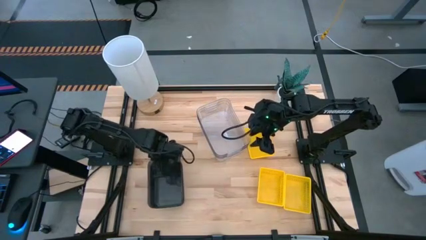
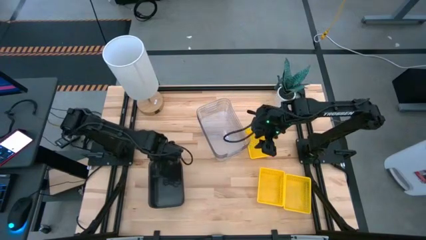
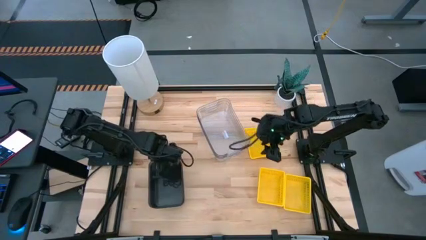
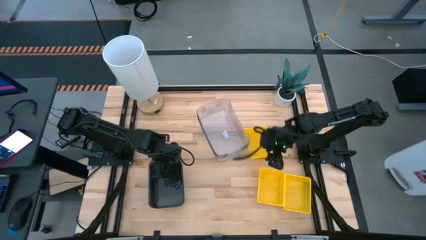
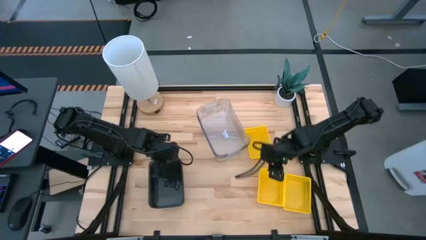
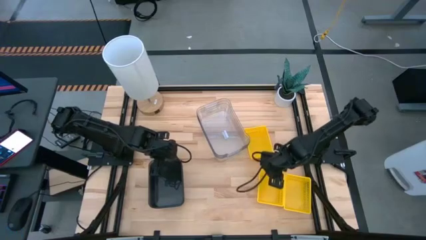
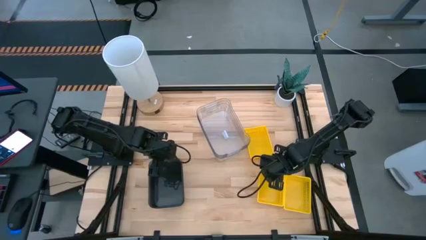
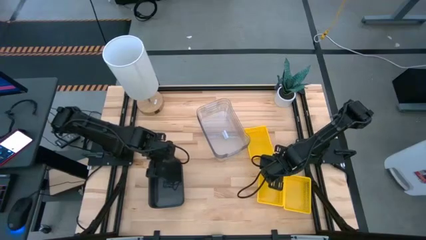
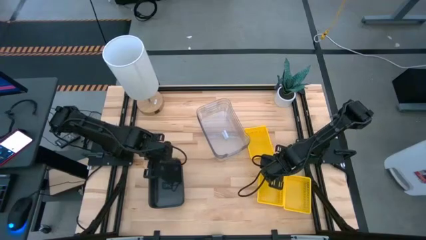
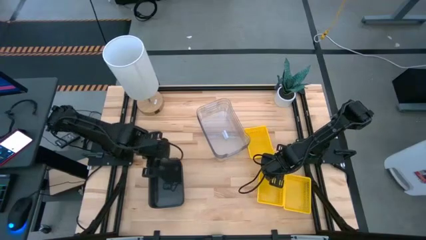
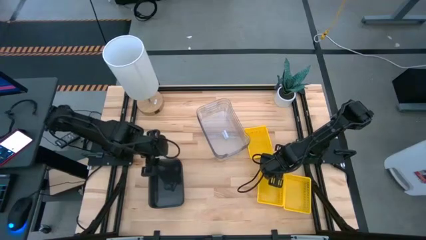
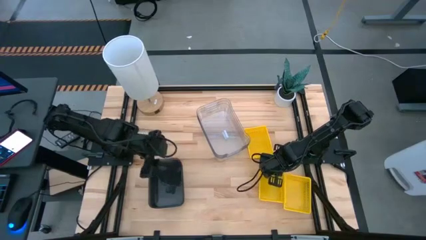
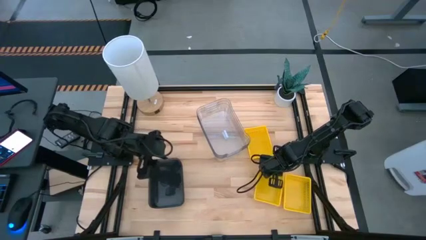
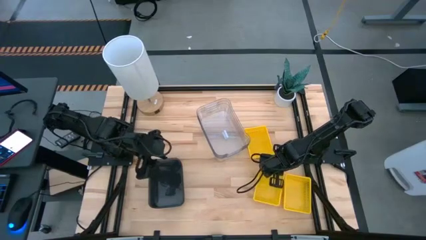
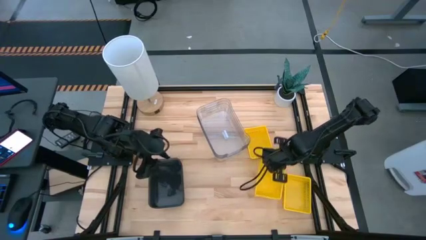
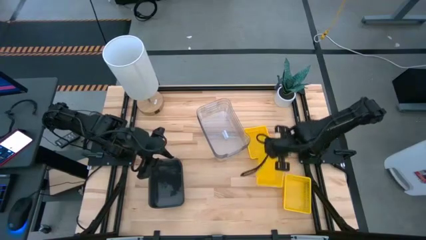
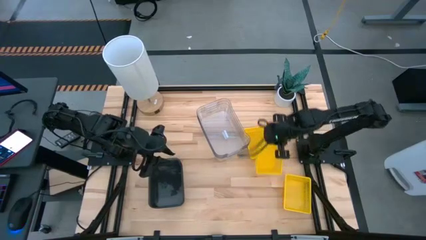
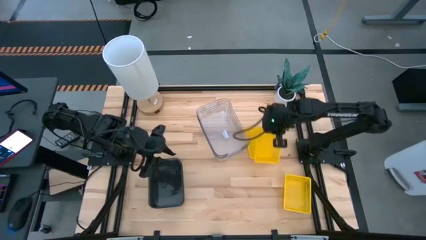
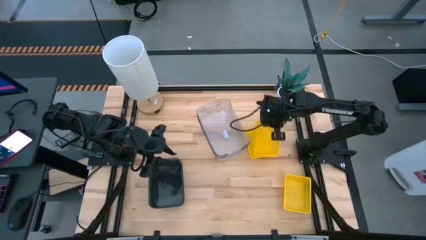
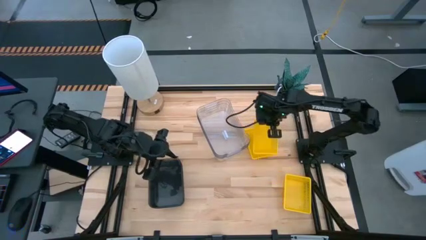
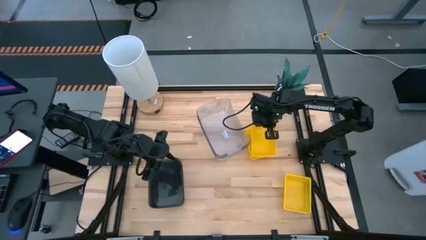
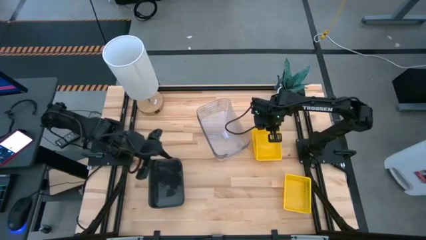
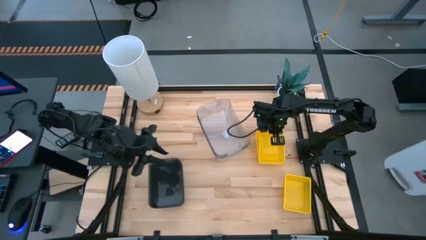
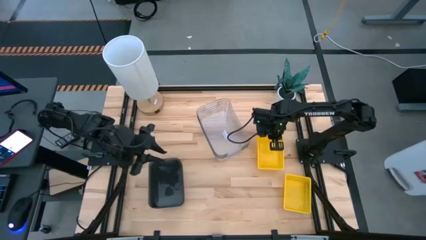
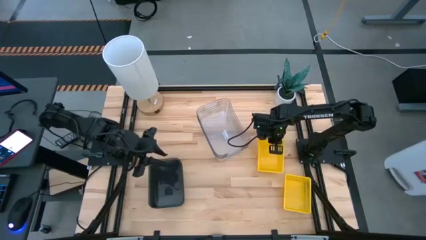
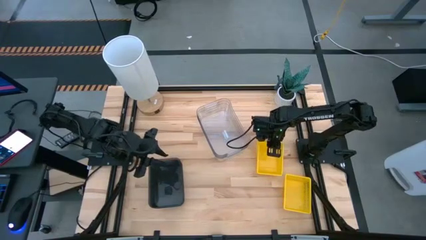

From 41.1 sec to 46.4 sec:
Stack the left yellow bin on the top of the top yellow bin

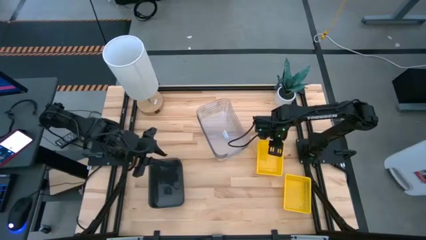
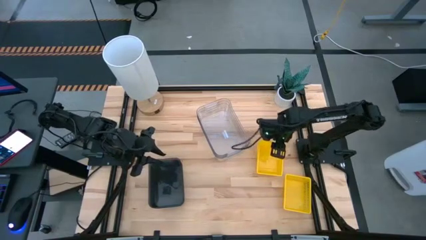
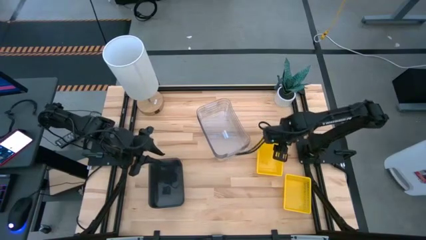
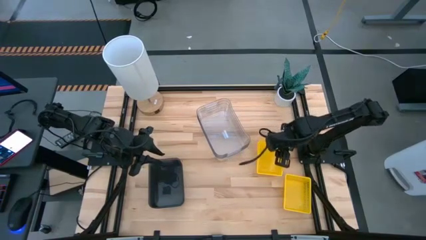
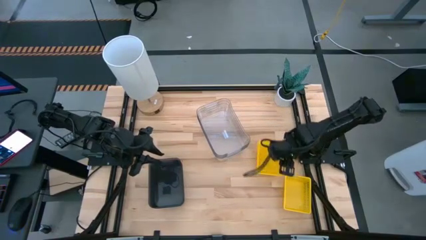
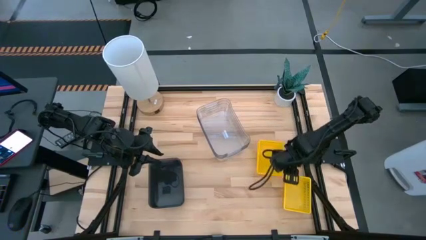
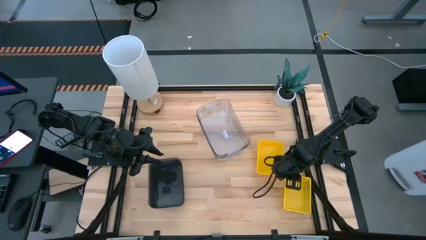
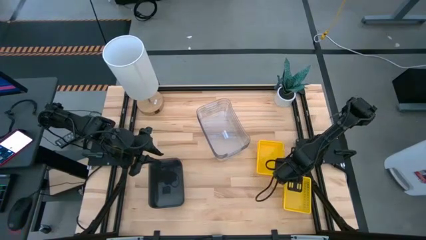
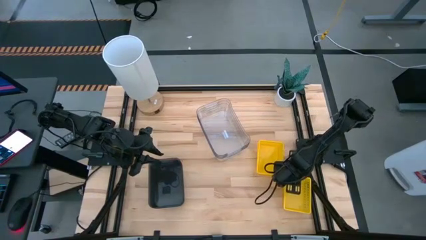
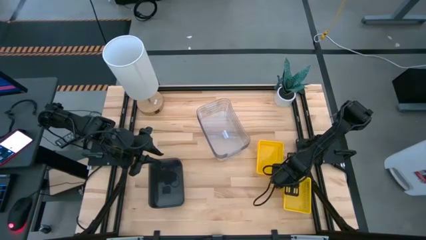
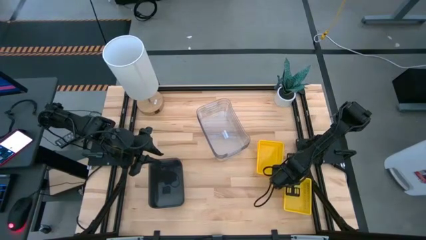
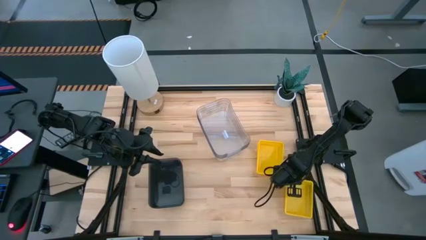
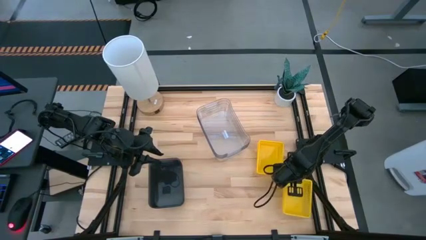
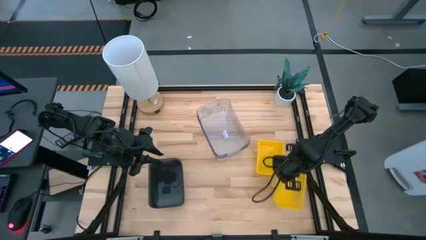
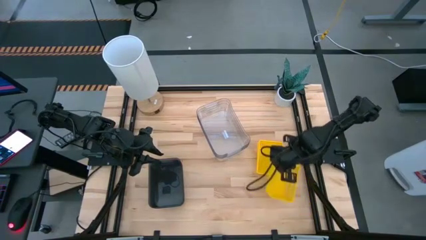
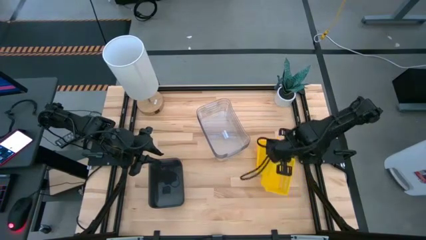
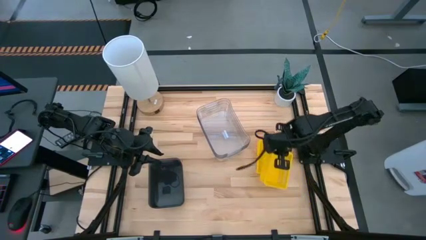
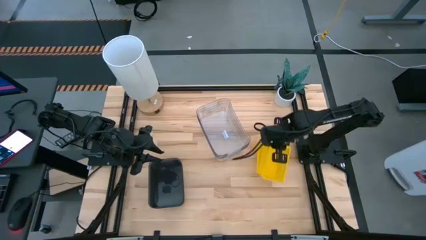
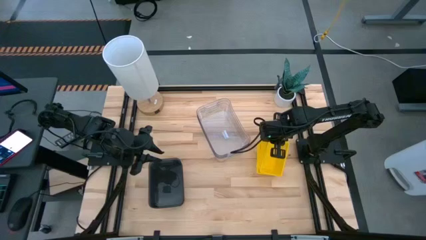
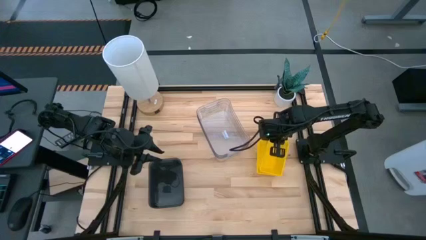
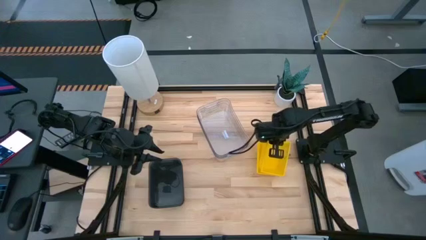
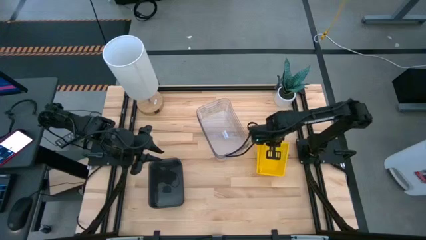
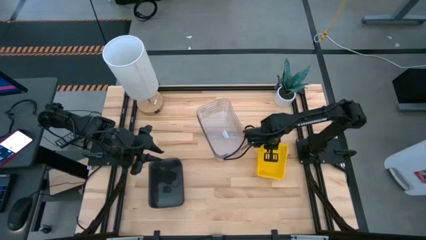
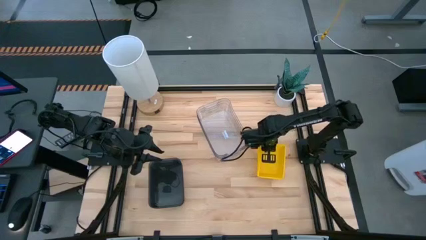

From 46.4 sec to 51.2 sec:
Stack the yellow bin on the top of the stacked yellow bins

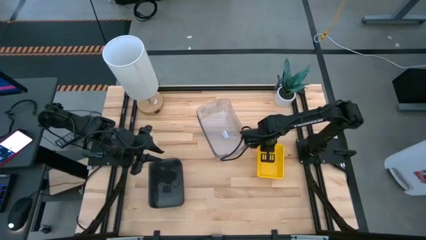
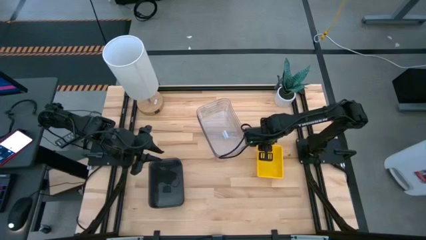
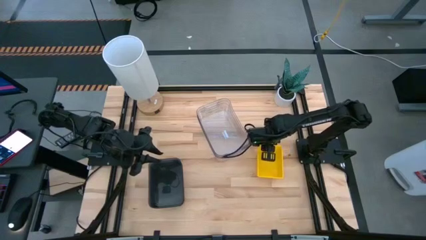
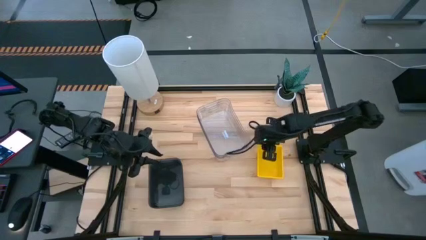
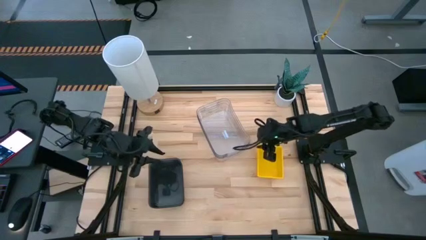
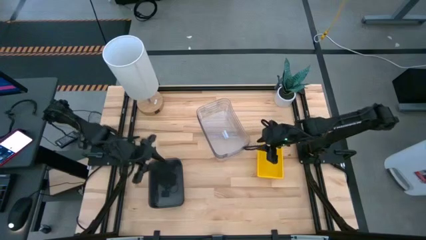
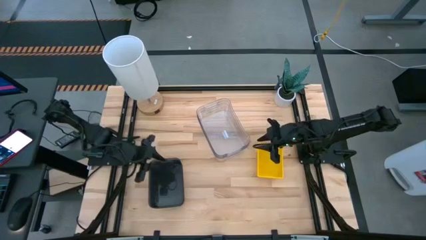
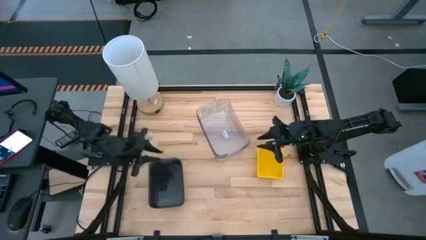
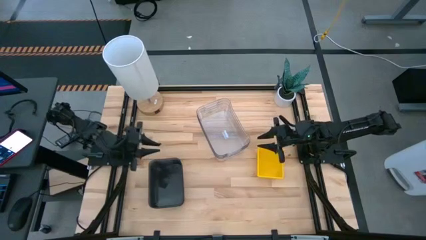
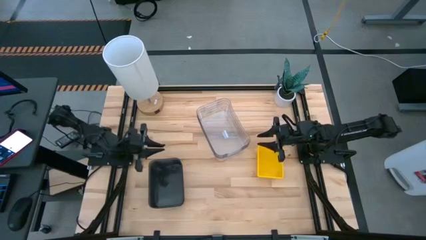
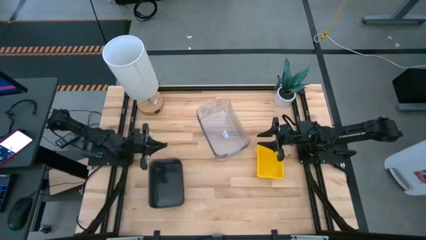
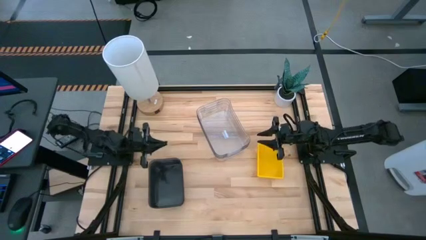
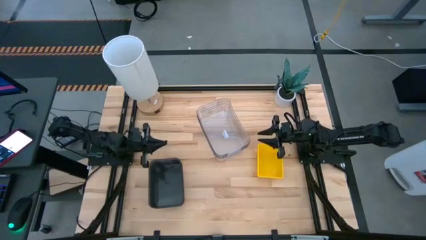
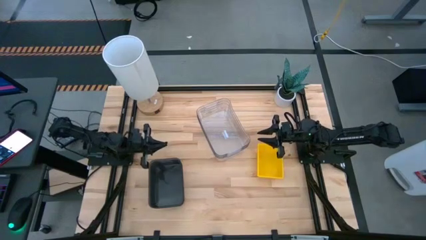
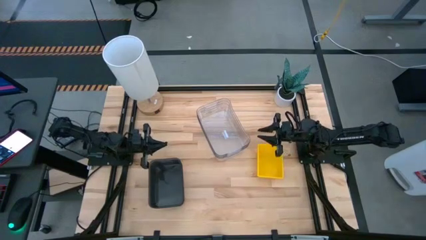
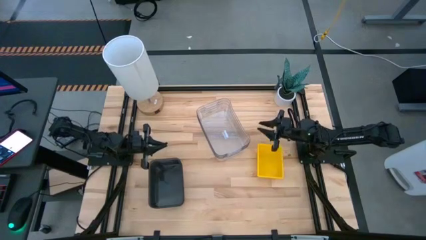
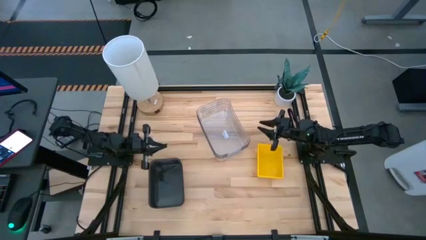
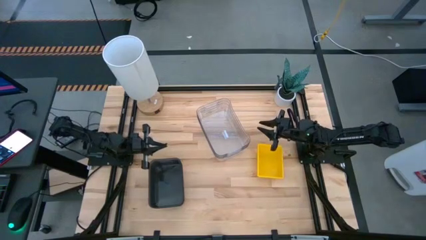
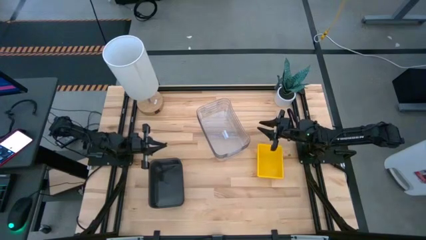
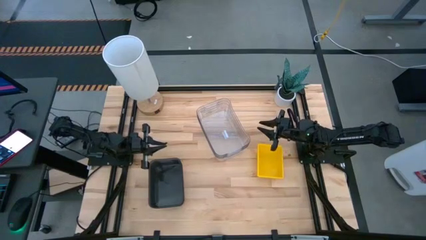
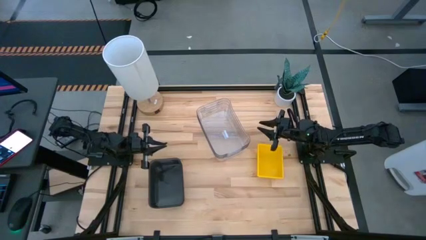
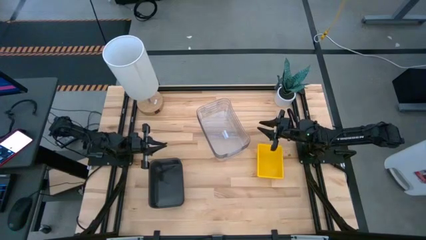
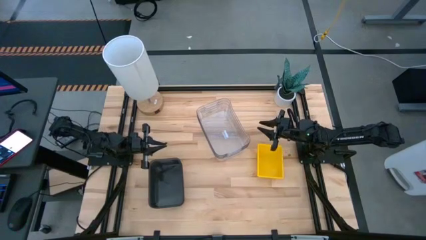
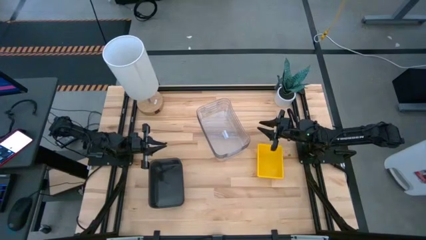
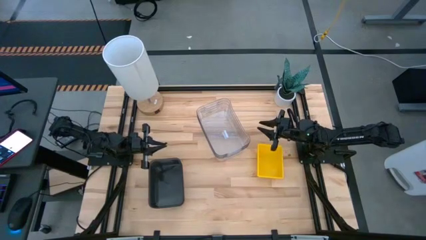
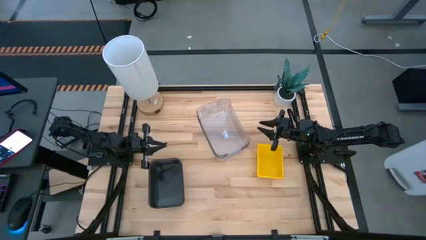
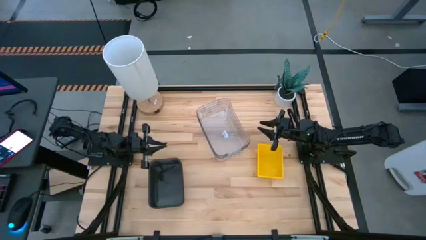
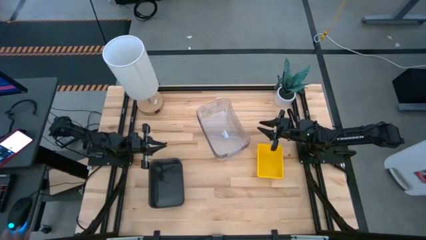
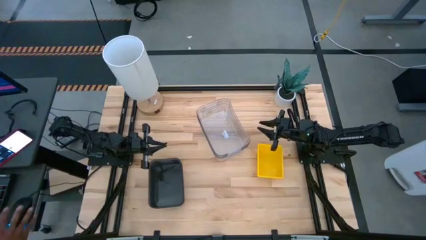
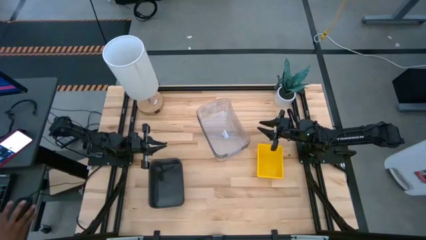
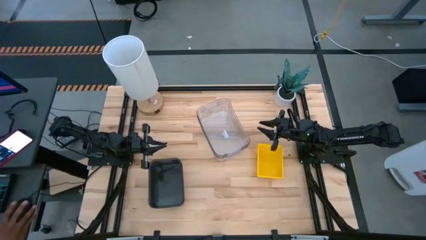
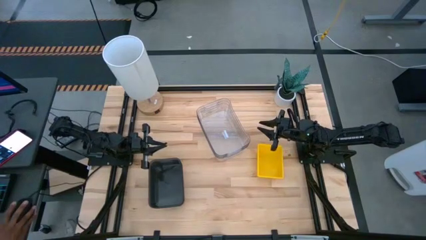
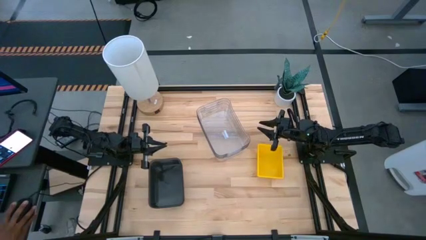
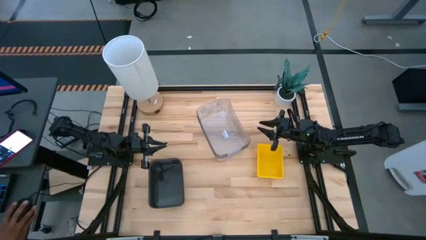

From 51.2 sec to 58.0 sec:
Return to Home Position
